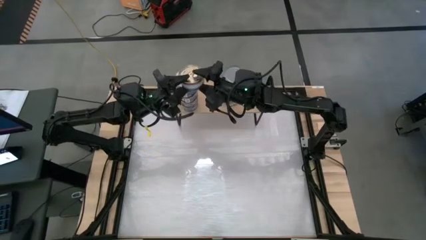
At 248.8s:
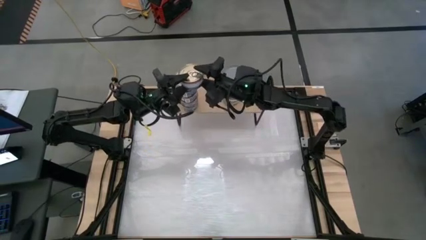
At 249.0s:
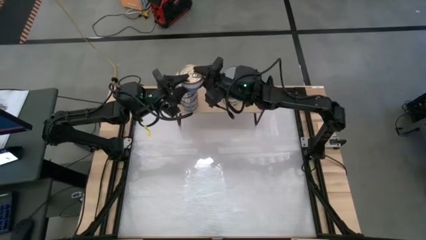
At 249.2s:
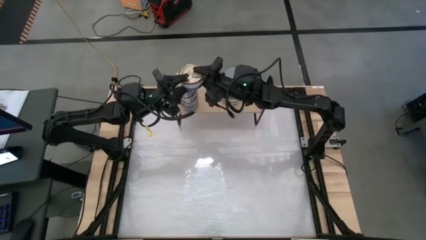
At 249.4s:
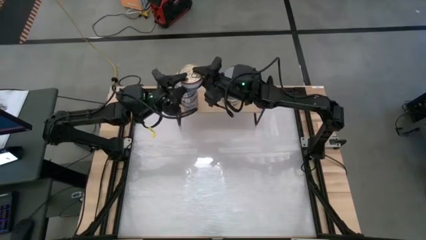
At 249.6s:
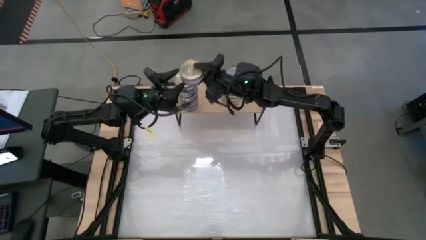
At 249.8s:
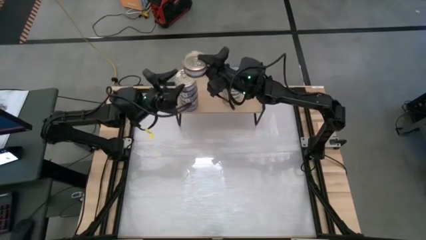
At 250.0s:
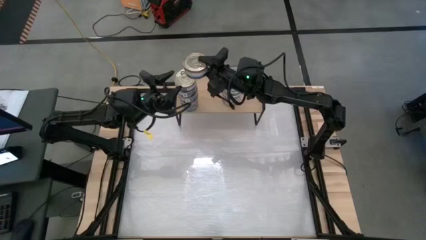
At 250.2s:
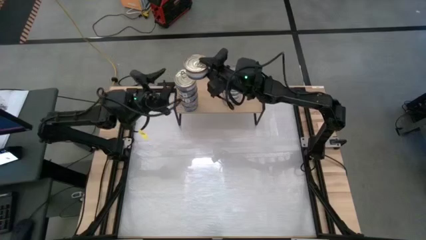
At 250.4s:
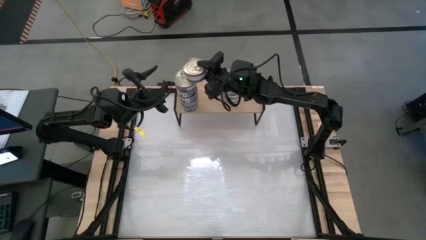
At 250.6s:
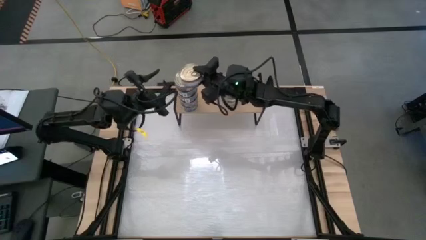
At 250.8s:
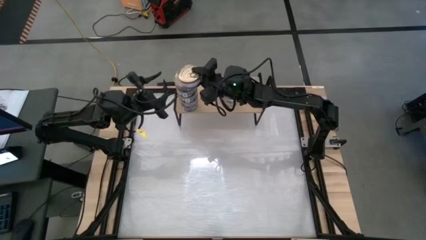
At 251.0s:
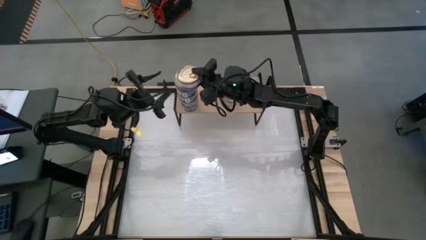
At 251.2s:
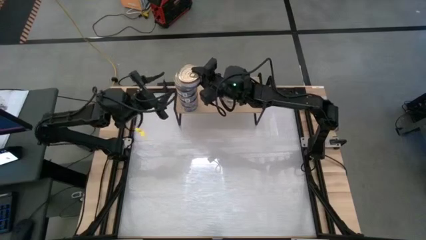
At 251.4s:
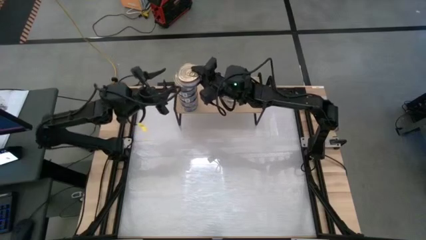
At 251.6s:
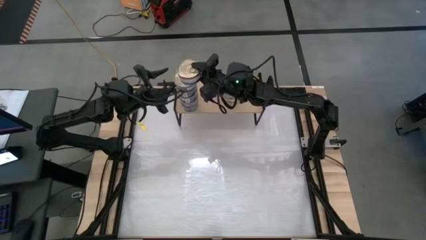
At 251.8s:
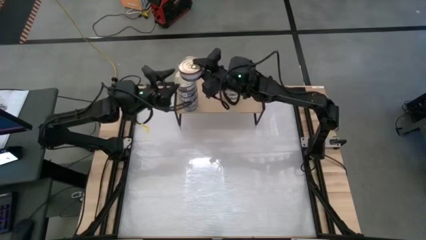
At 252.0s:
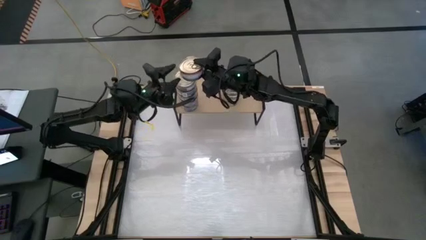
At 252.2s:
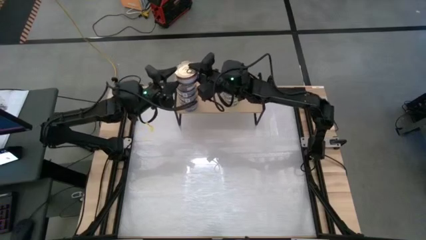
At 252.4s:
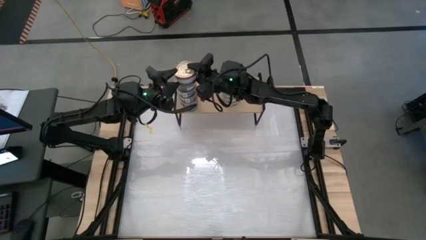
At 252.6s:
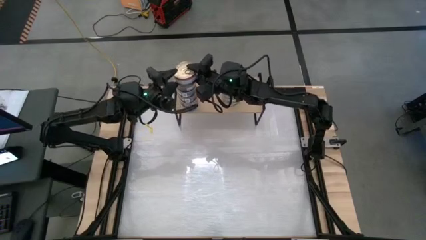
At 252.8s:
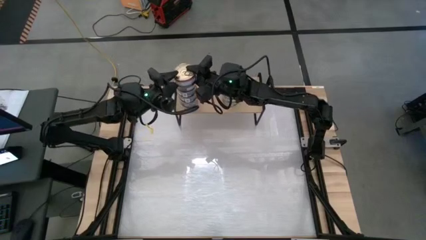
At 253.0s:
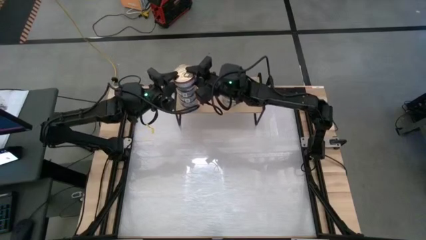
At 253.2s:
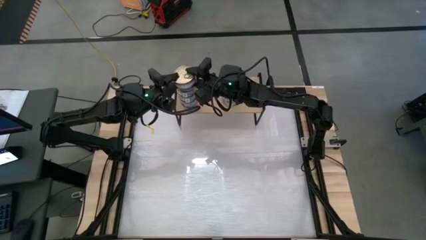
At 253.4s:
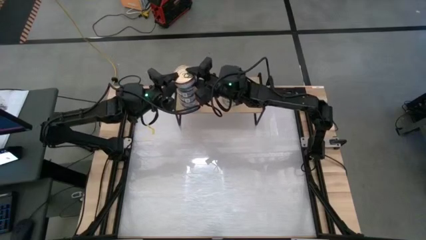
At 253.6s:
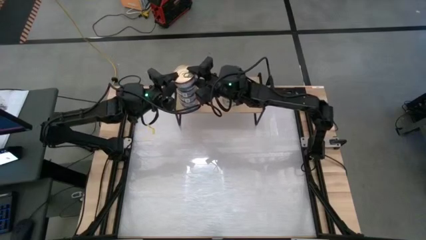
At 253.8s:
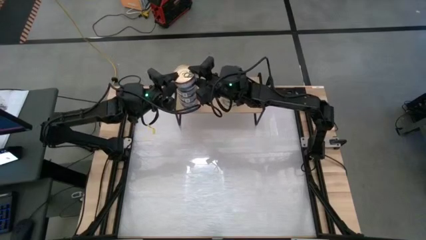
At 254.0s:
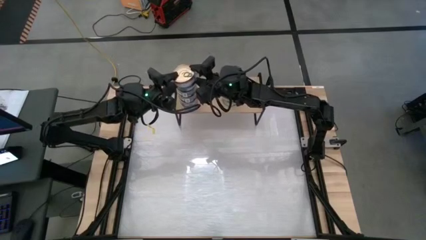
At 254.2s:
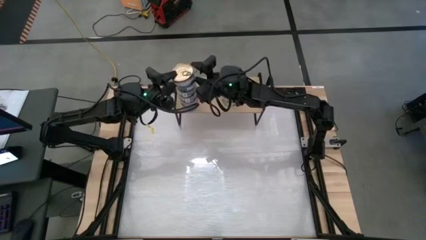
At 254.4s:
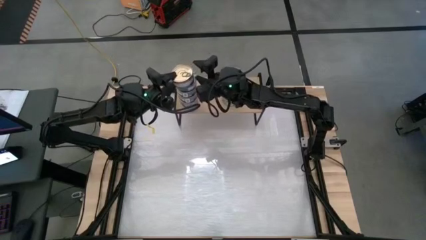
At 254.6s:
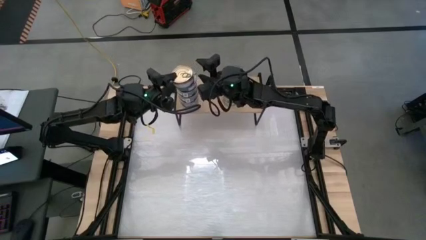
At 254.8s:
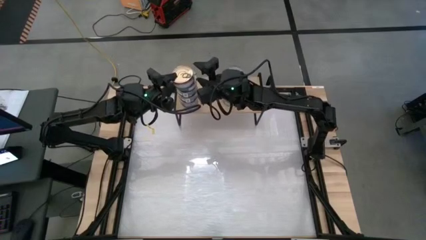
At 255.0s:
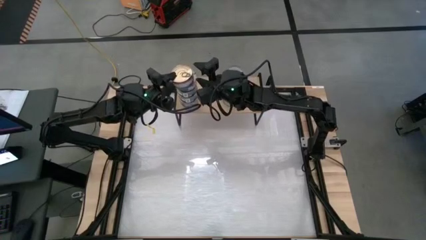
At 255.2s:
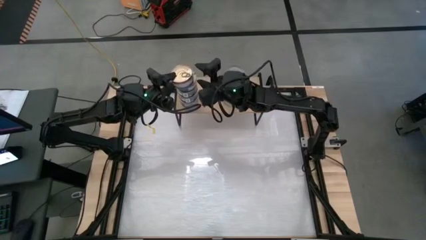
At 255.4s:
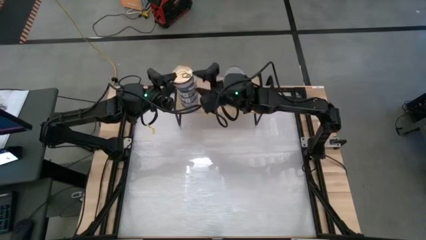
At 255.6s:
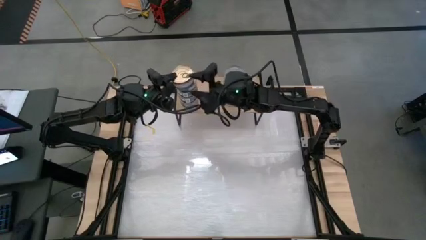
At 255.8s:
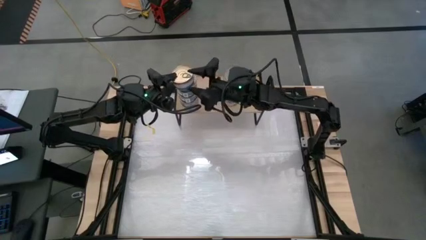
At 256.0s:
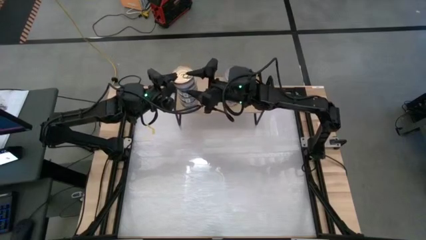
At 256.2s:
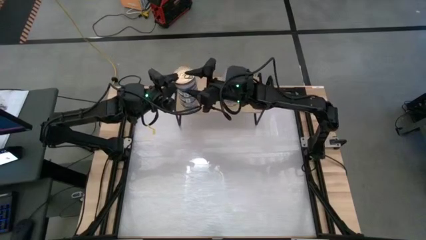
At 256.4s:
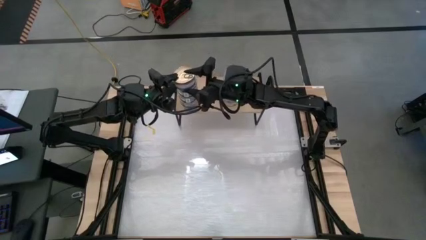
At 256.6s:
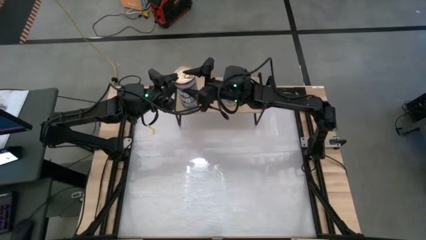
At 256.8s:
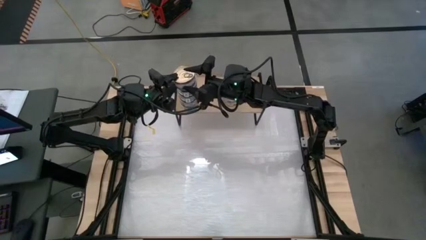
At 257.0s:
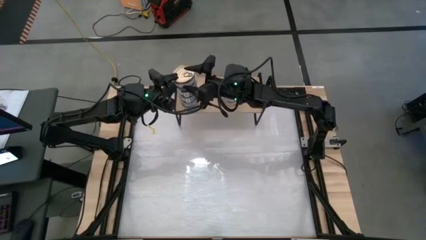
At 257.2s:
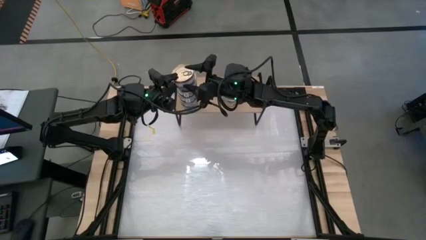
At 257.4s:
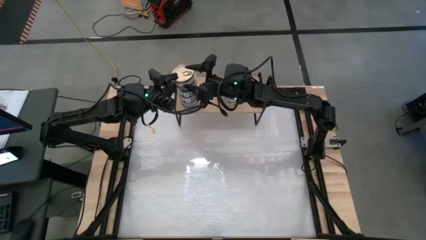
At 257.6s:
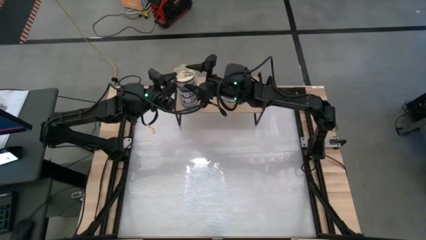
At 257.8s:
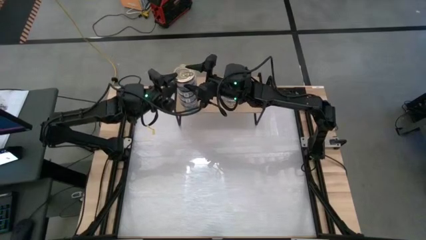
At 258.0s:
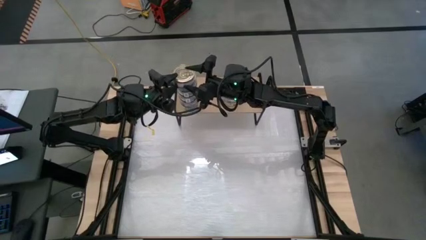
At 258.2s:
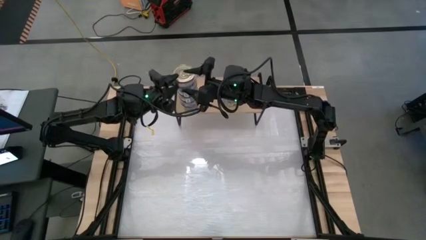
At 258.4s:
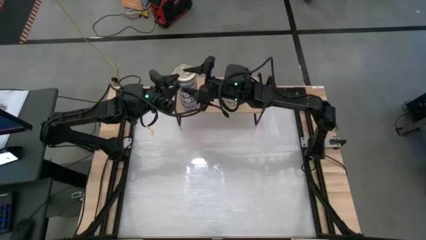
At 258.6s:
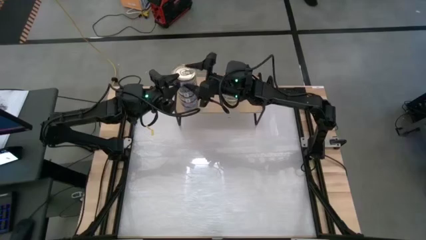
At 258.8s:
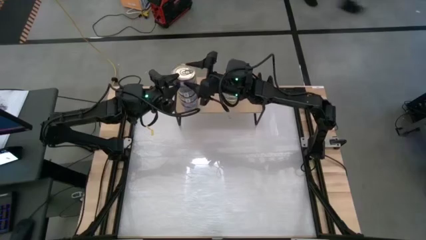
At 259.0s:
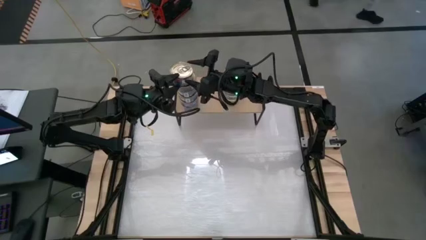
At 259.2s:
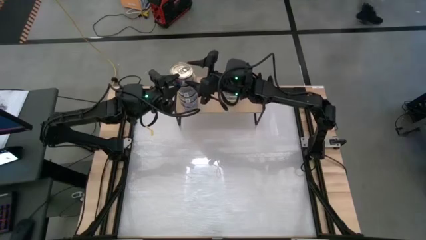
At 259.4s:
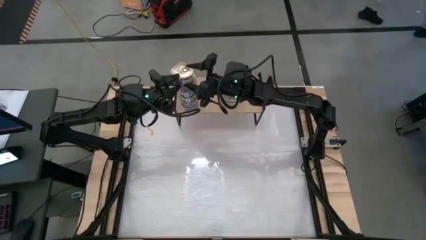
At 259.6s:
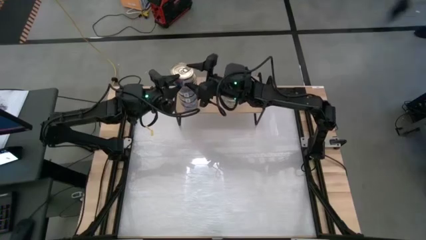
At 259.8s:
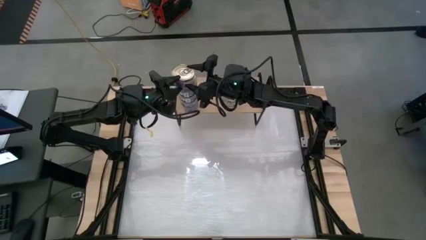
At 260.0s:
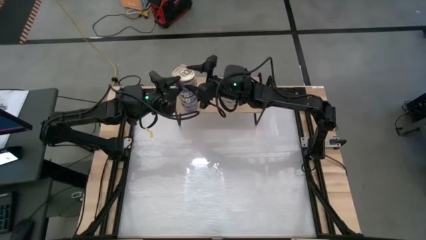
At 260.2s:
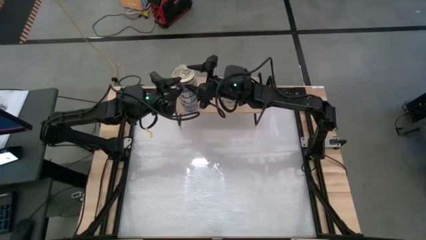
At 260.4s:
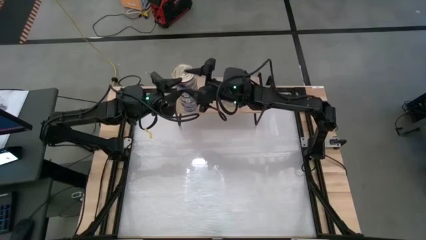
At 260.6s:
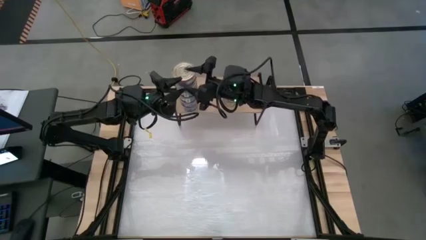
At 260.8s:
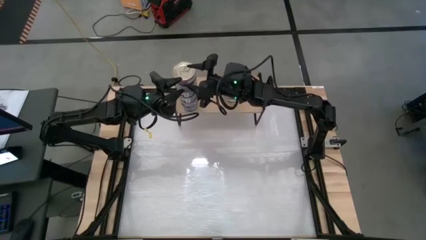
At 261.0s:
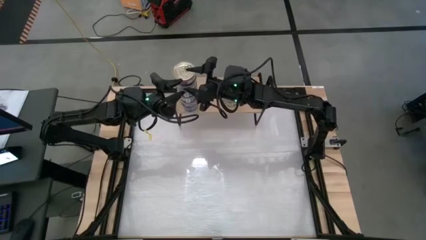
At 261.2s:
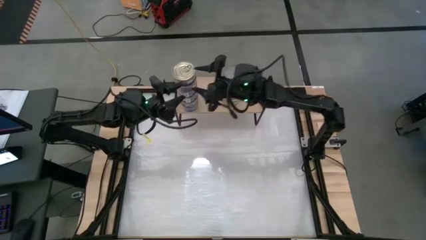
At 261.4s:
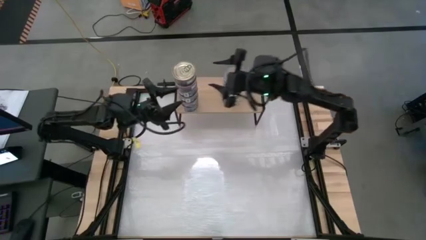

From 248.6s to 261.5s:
Task: Stack canned seafood by type on shelf
Stack the blue tuna can on top of the other blue tuna can on the shelf

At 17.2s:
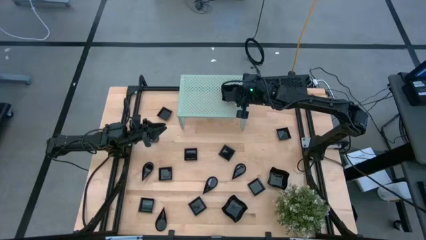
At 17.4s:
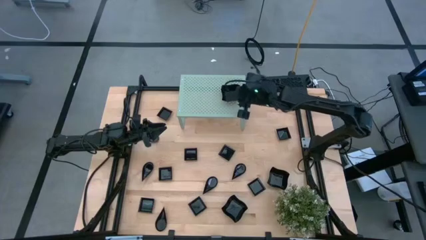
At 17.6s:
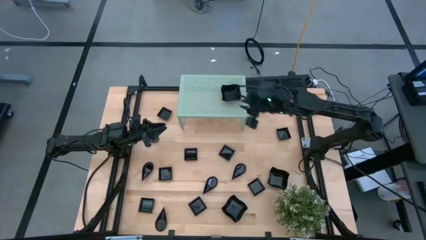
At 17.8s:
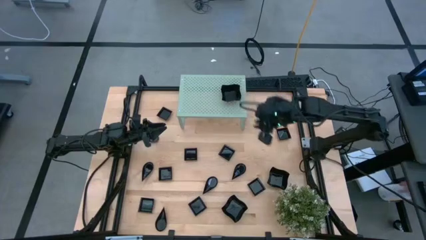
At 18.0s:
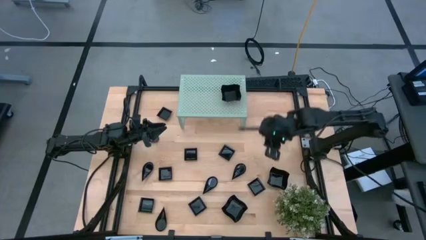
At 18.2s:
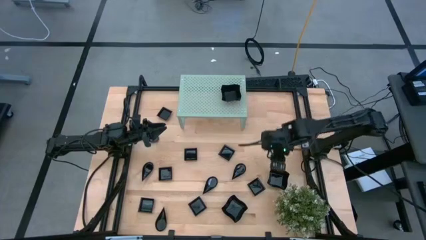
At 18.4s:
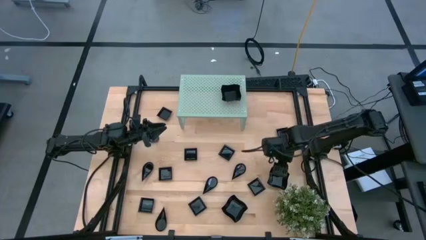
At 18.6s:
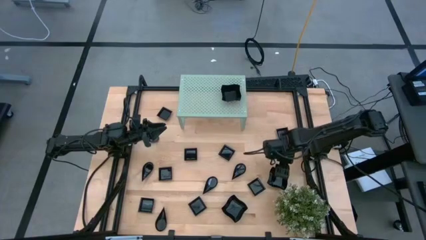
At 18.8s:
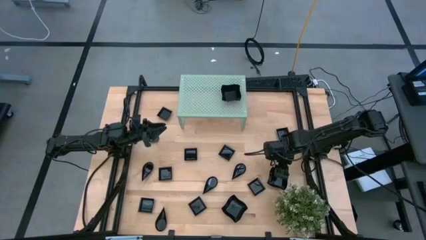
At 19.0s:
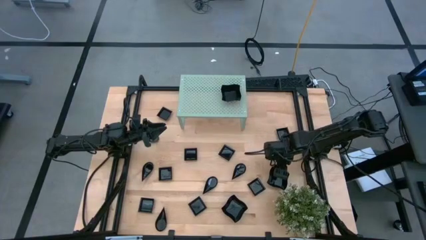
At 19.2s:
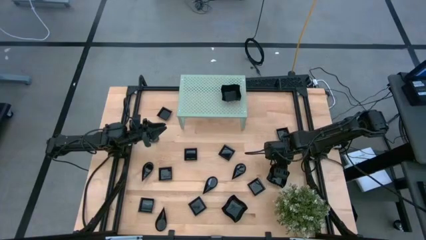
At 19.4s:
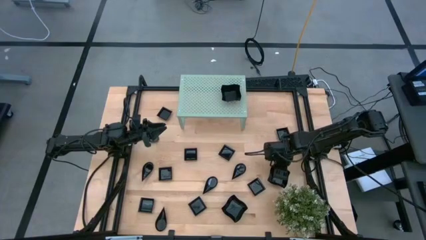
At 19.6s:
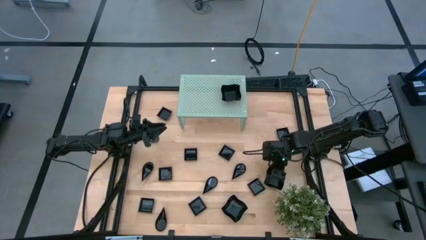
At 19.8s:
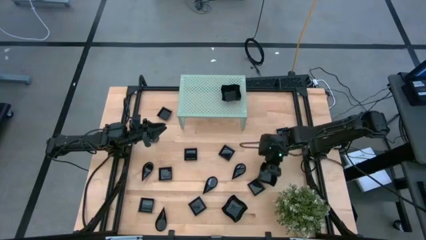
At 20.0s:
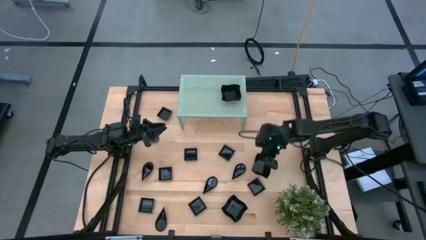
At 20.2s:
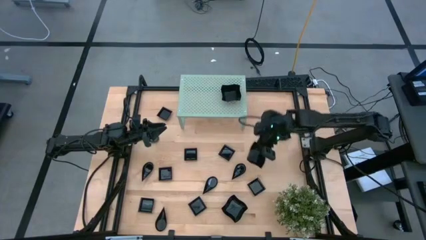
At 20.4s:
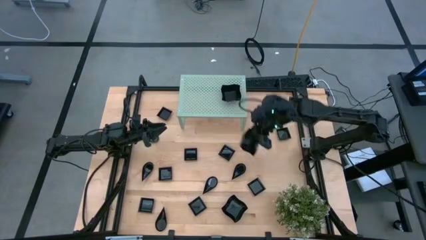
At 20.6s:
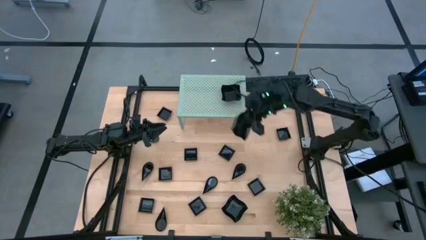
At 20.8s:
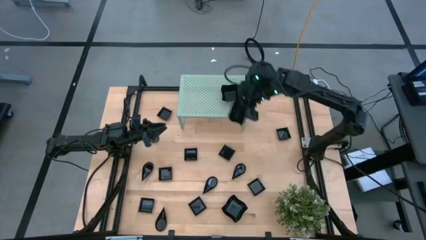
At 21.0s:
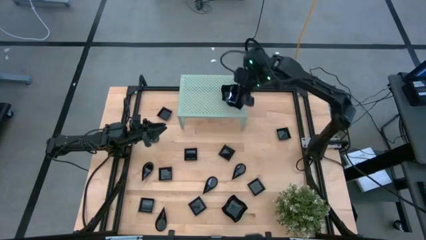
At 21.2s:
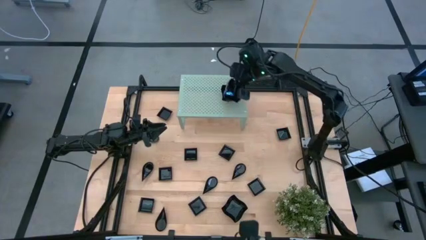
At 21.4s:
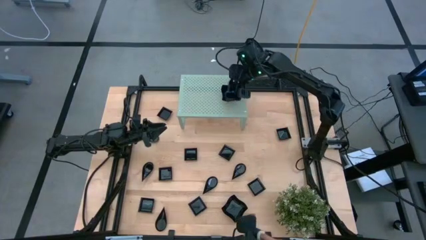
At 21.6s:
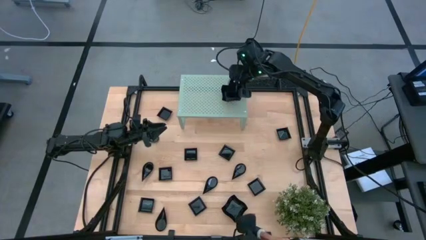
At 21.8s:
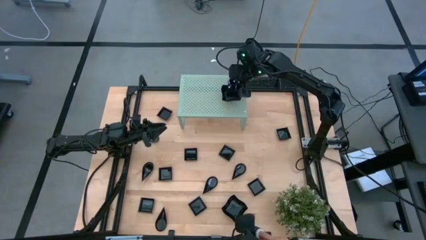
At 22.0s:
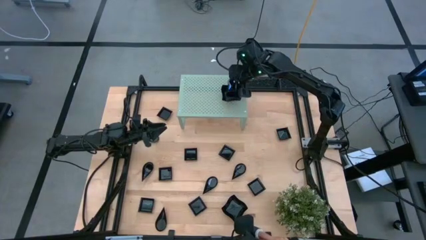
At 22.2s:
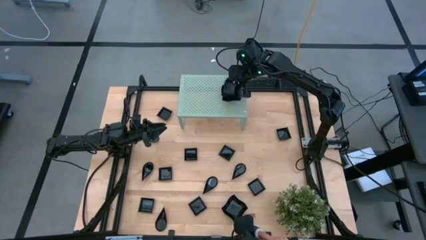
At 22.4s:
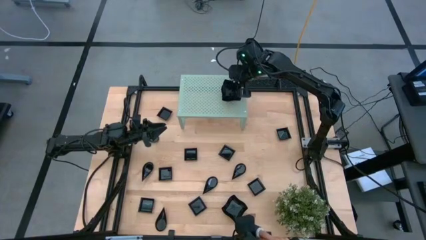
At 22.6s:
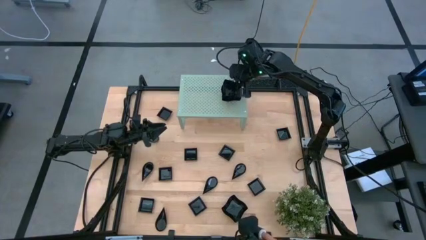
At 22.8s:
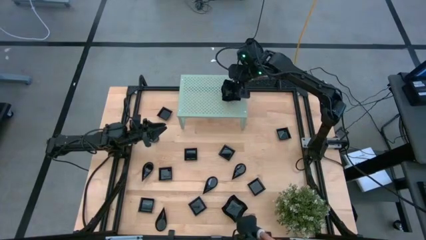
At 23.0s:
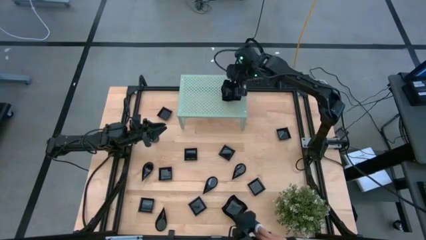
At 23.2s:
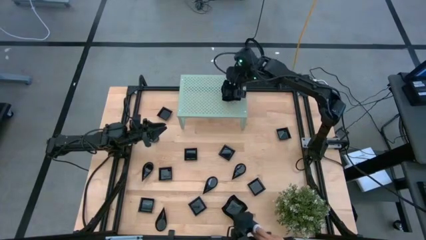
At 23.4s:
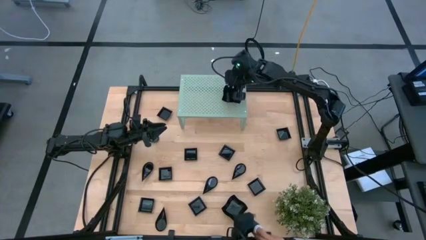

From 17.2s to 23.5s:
Task: Pick & Place Mini shaped plates
Stack the black distorted square plate on top of the other black distorted square plate on the shelf
